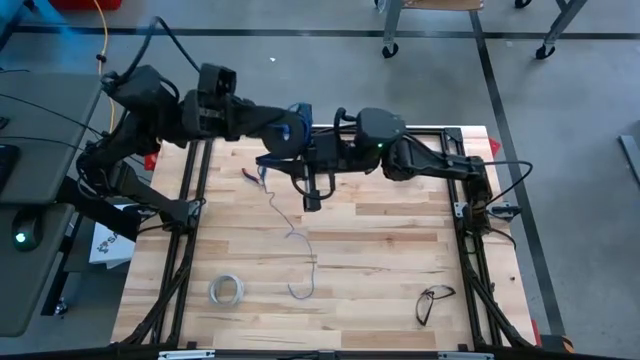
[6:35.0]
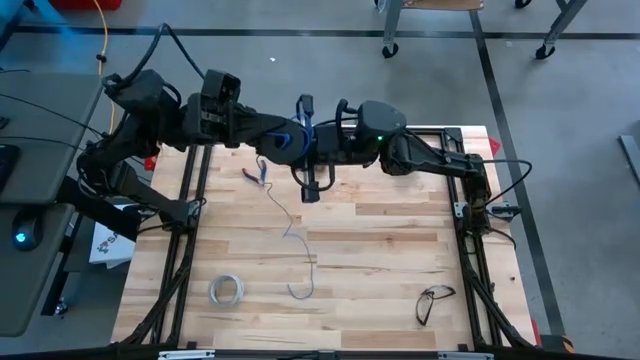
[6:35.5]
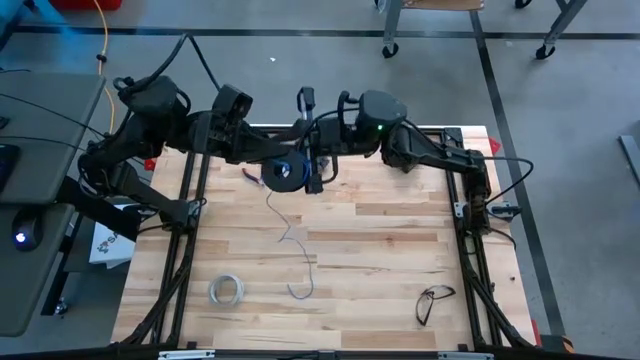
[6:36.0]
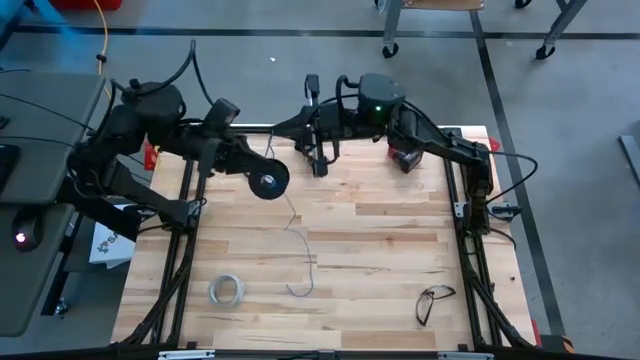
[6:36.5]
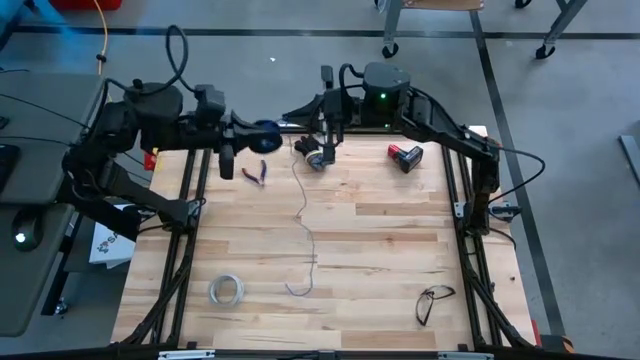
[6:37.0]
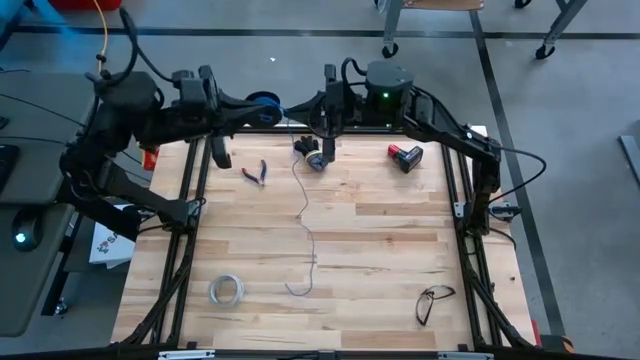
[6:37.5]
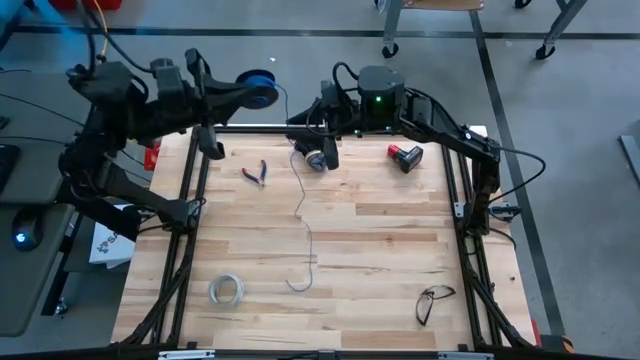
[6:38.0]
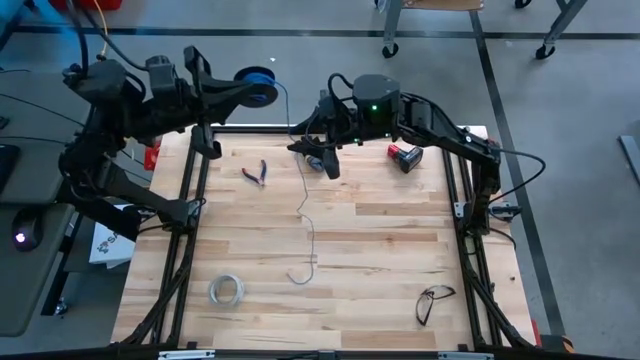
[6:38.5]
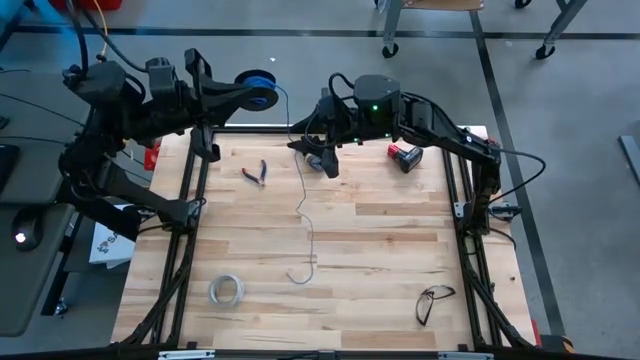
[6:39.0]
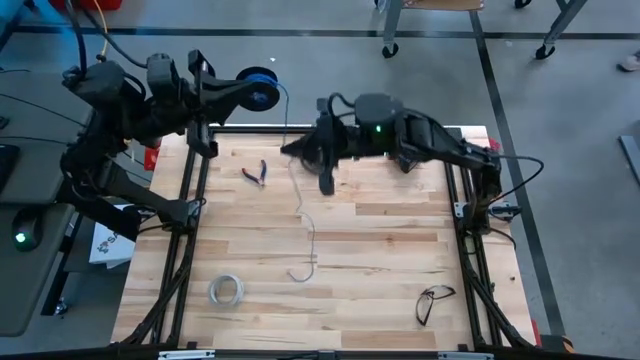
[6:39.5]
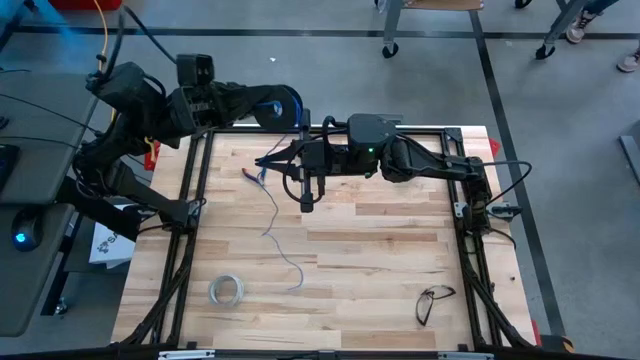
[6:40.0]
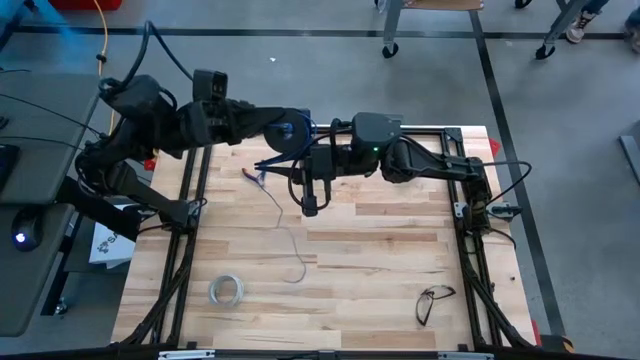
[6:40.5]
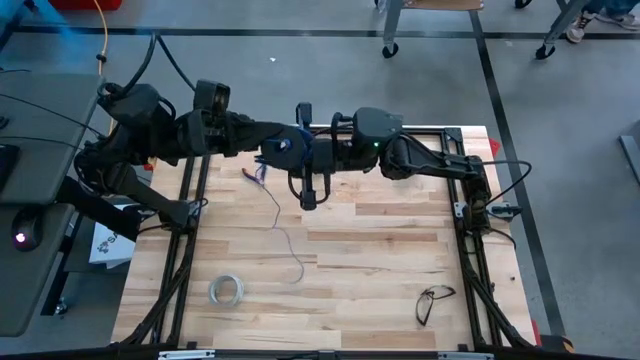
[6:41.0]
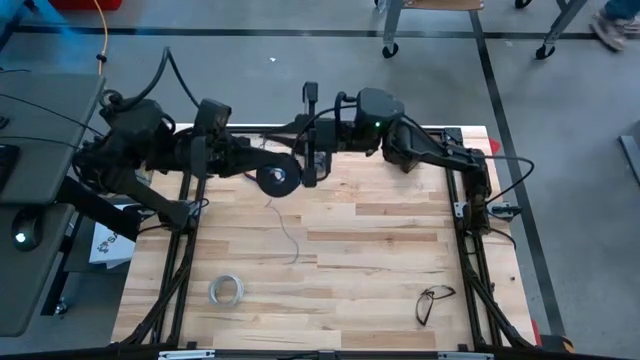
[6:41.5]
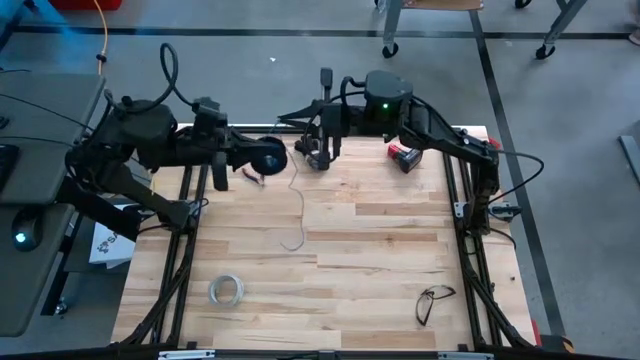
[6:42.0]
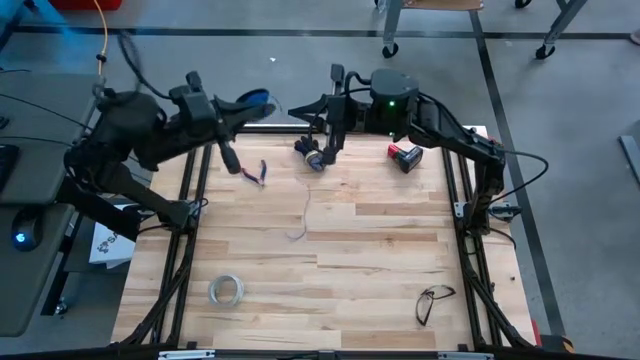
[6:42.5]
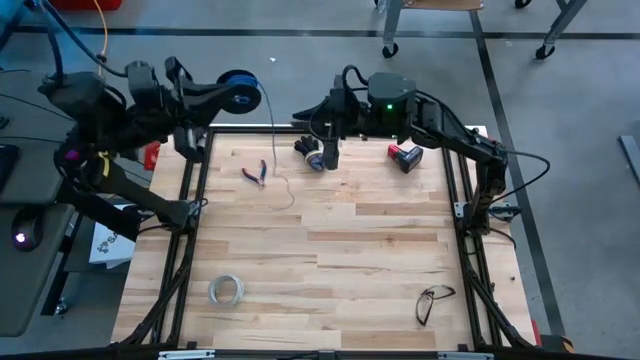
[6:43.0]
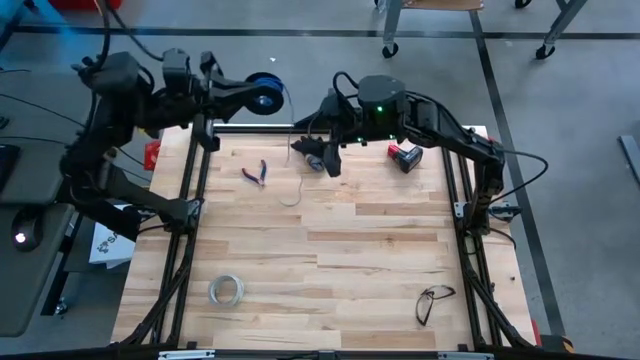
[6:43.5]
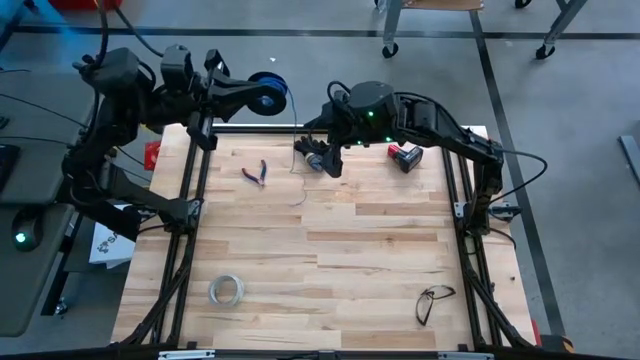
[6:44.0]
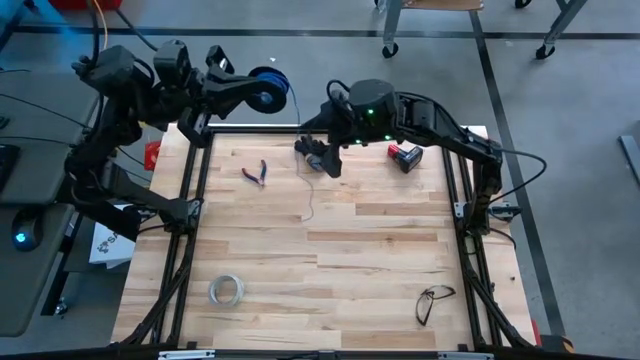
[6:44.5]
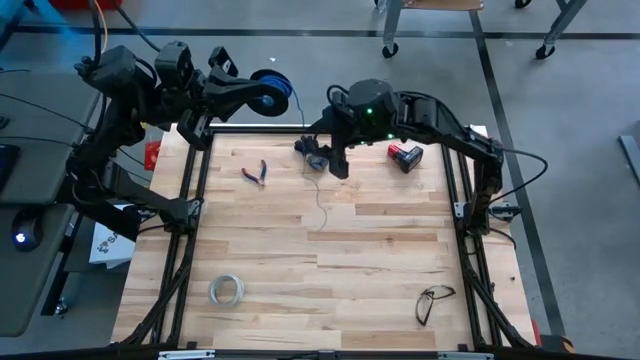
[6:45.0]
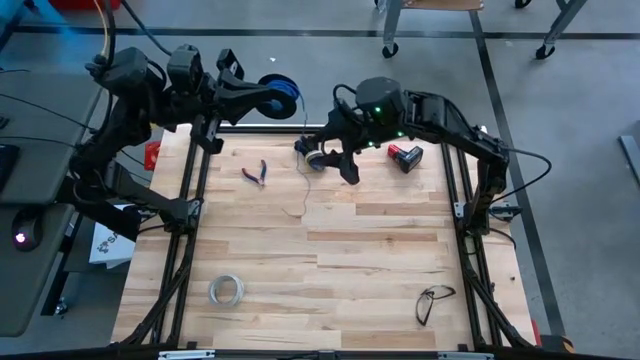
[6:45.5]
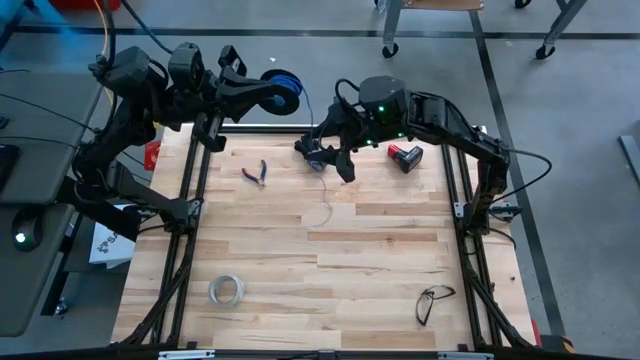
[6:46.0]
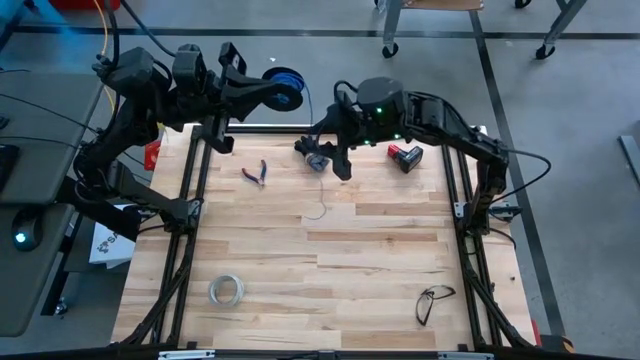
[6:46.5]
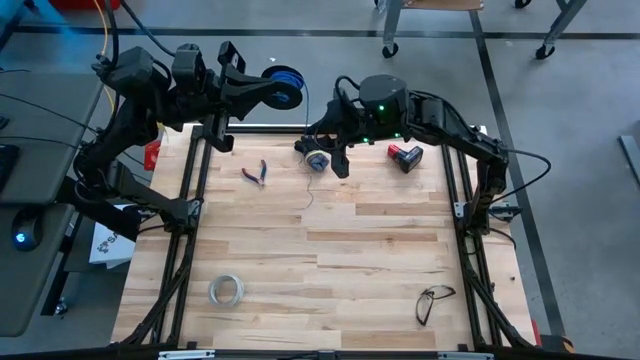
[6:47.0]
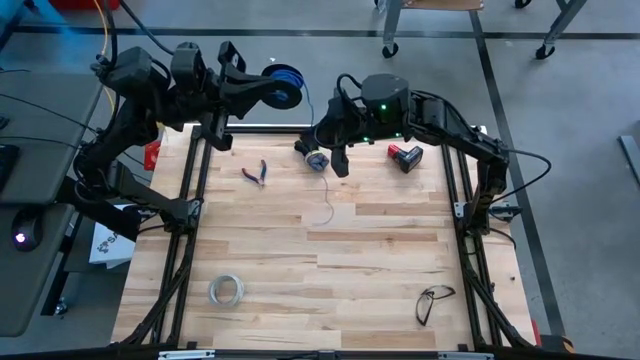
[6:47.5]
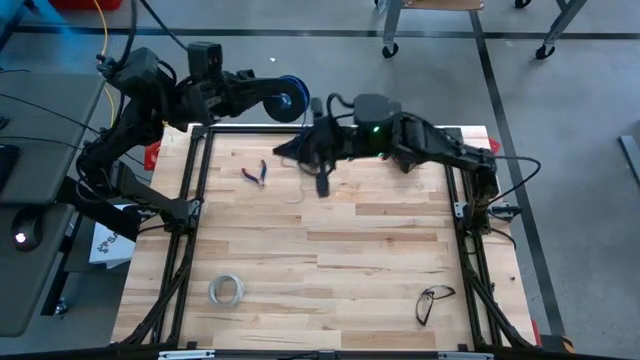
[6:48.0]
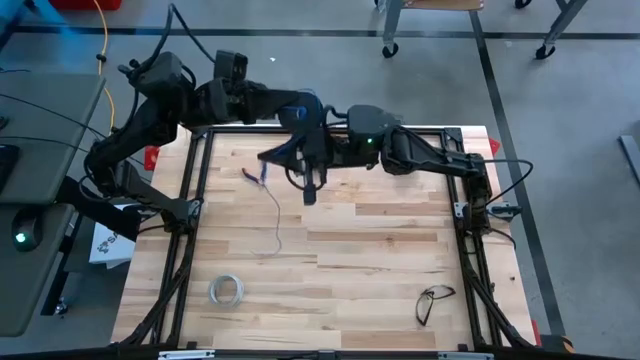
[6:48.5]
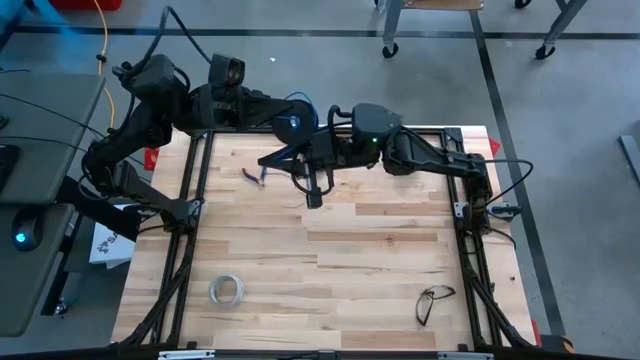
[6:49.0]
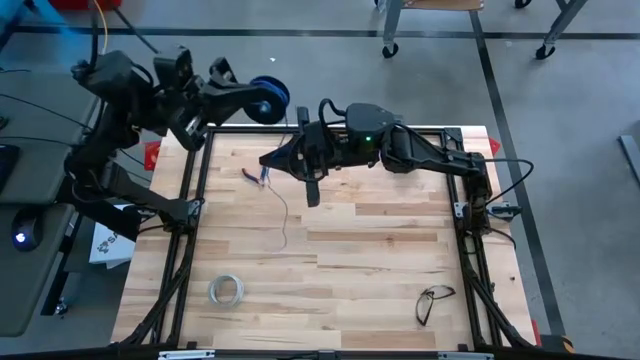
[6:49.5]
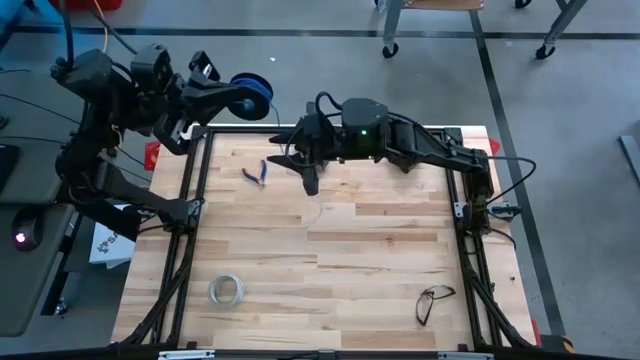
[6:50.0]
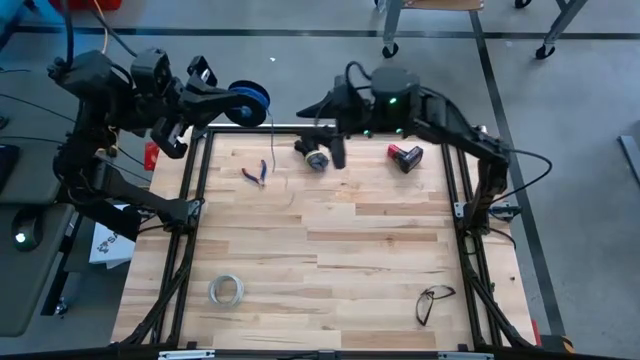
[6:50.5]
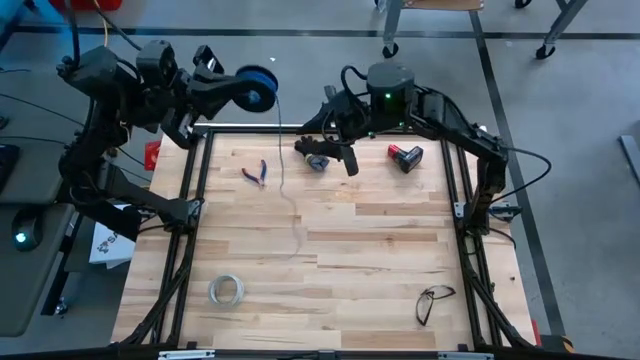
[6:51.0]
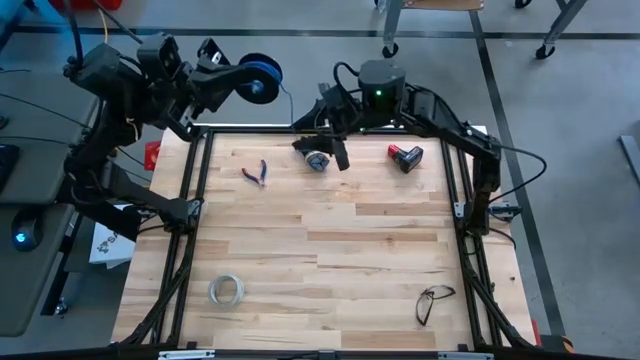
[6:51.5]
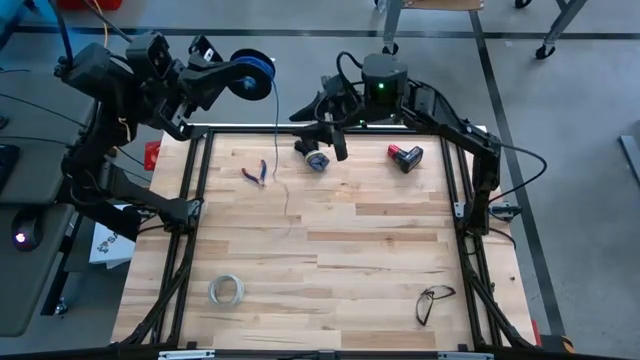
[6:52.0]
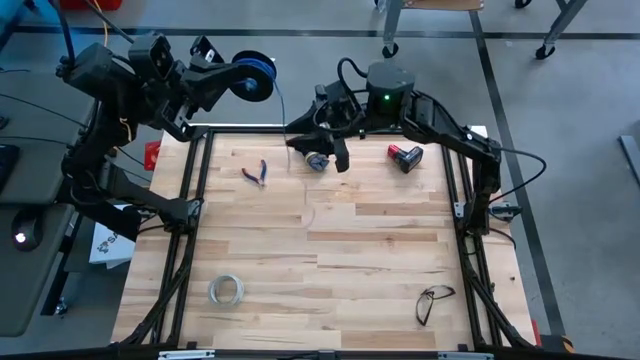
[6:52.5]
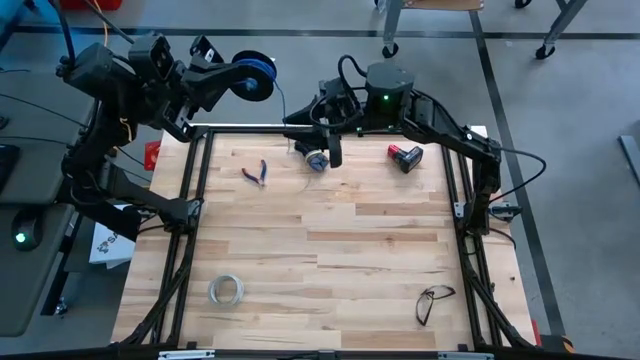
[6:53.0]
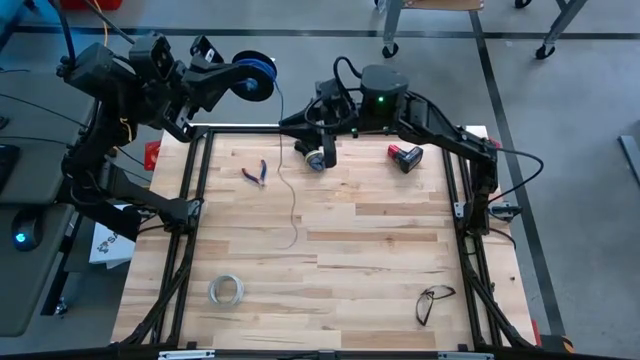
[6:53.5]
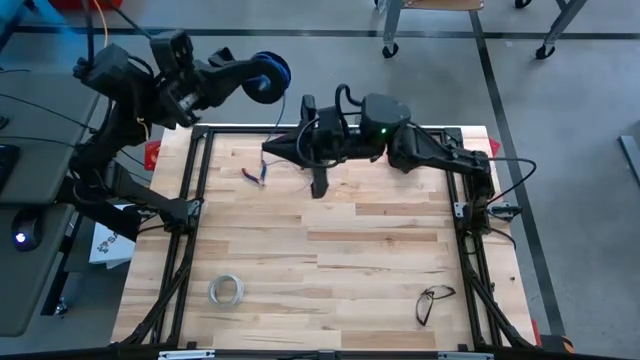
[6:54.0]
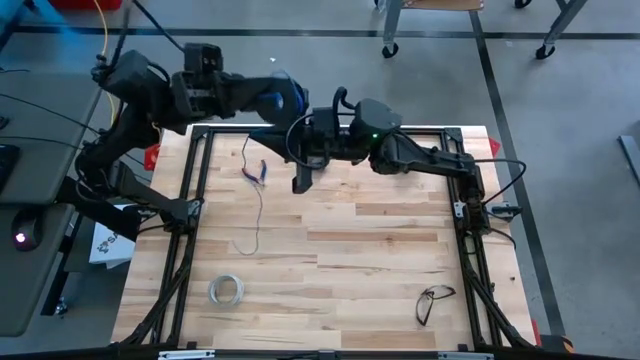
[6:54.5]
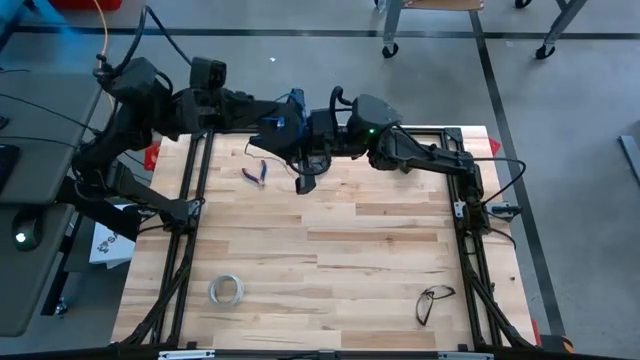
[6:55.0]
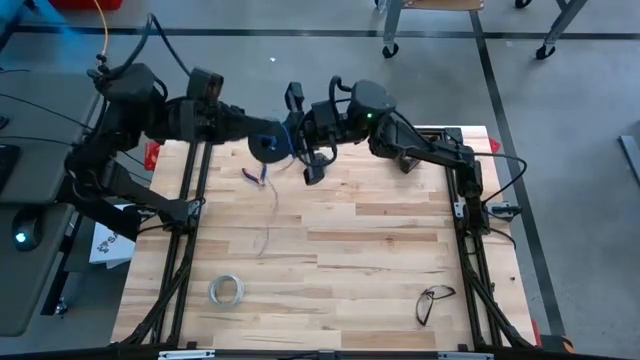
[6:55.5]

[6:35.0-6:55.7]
Task: Coil cords
Coil the blue wire onto the black spool
